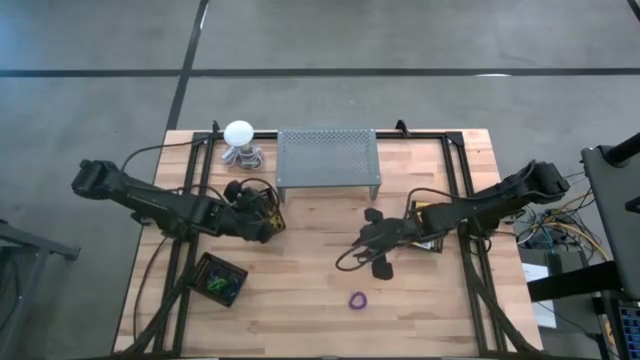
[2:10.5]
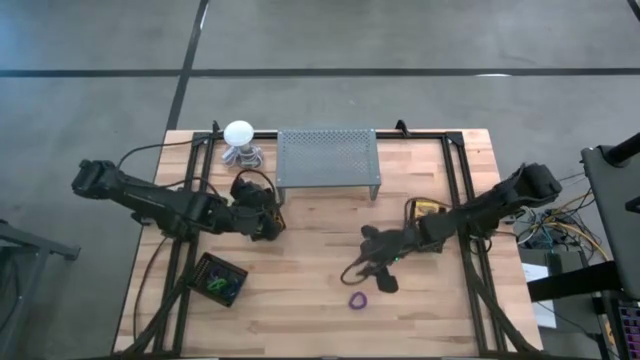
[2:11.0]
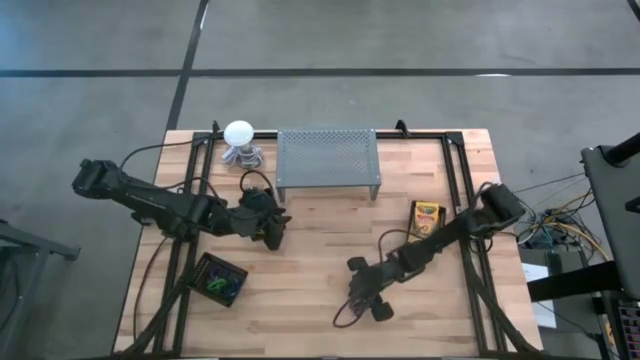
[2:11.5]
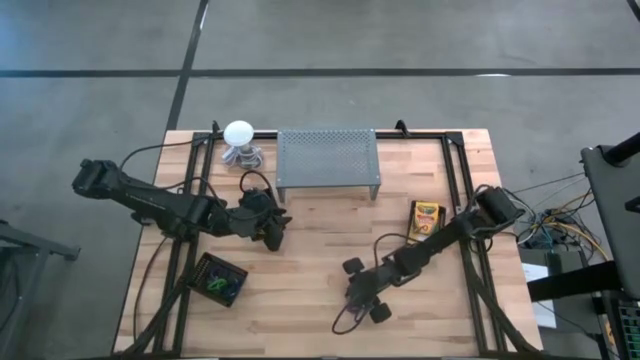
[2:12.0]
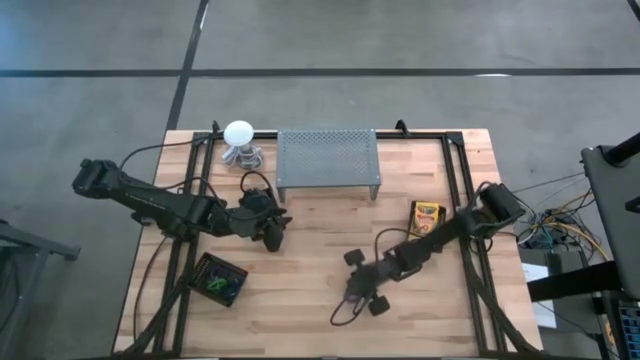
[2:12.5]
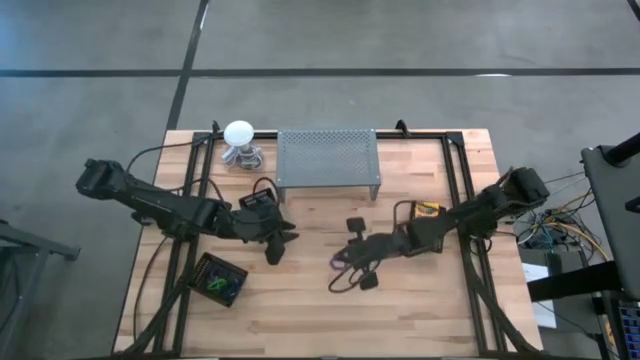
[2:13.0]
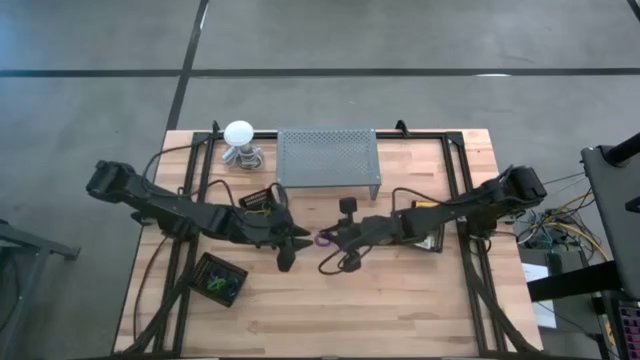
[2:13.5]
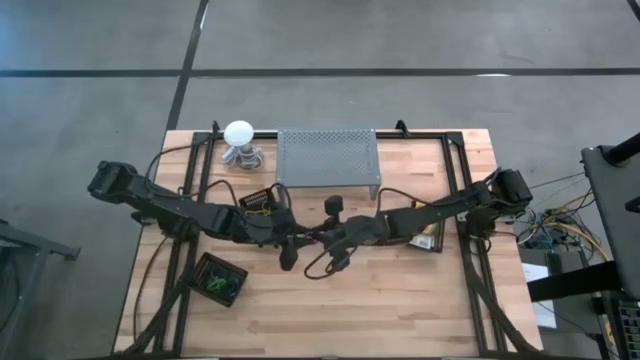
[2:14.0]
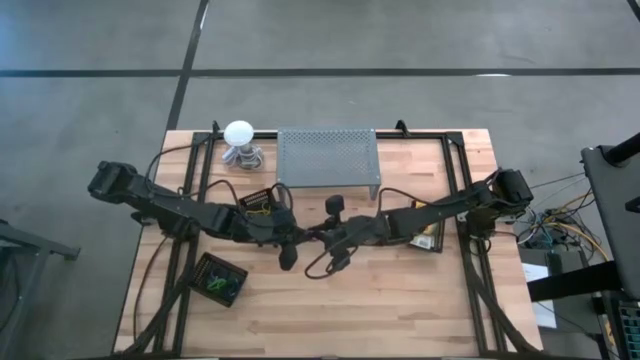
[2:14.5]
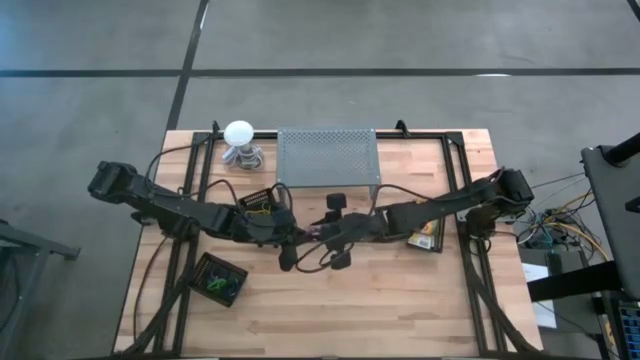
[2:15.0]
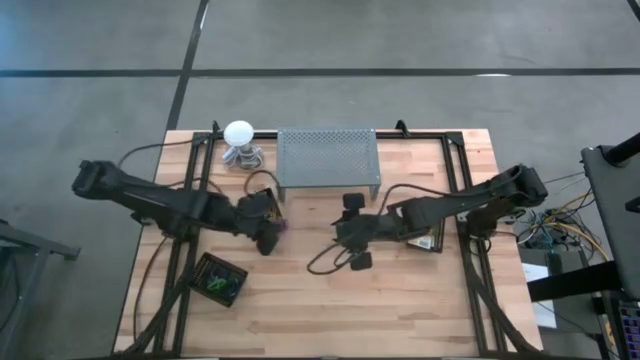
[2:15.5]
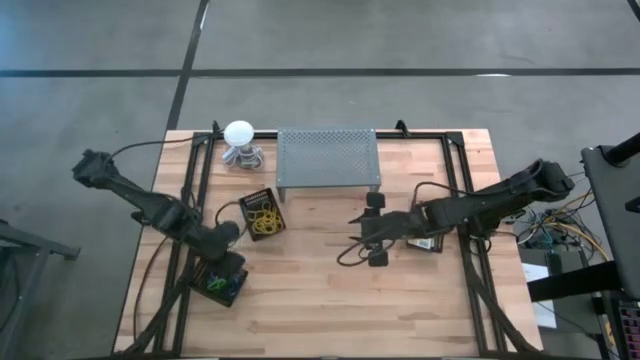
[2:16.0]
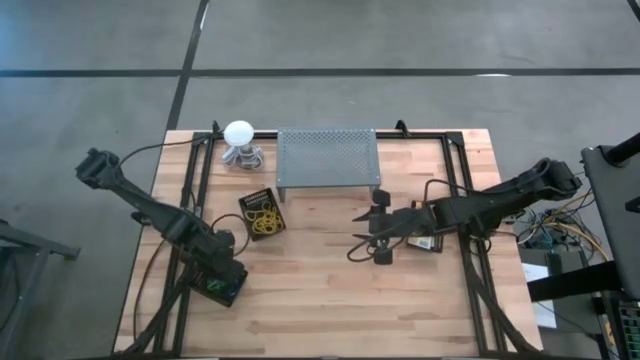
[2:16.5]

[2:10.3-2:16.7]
Task: Pick & Place Office Desk Supplies
Put the purple spring keychain into the bottom black bin

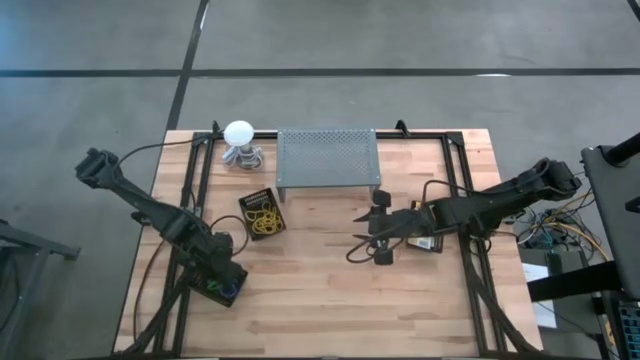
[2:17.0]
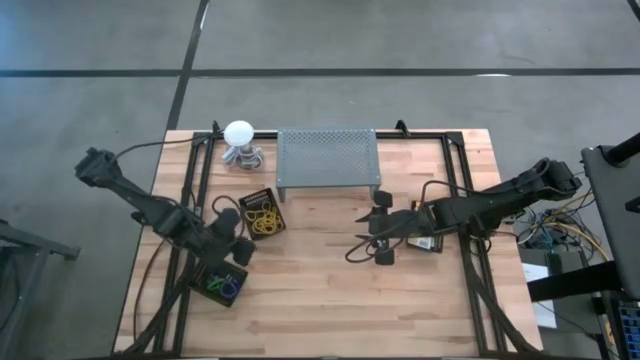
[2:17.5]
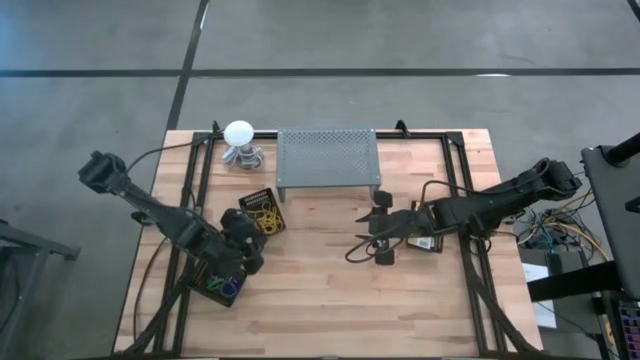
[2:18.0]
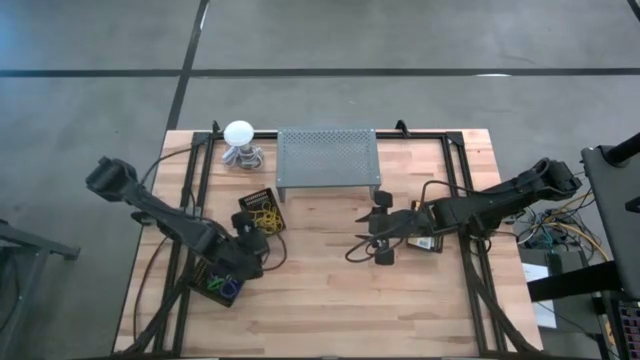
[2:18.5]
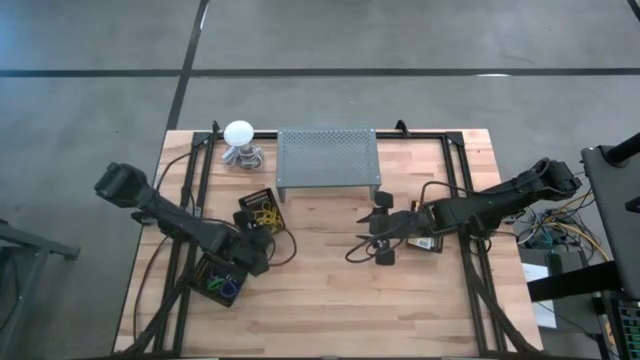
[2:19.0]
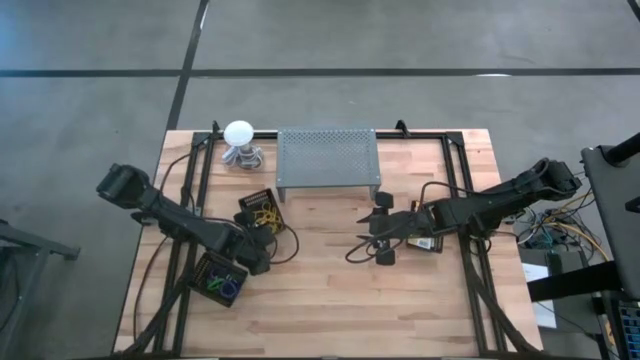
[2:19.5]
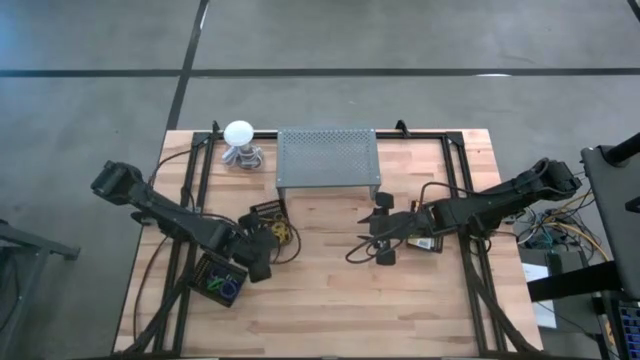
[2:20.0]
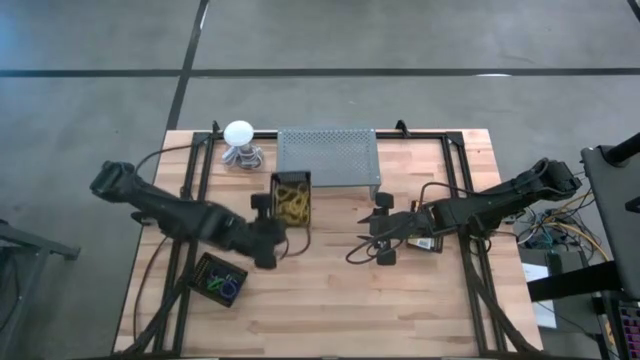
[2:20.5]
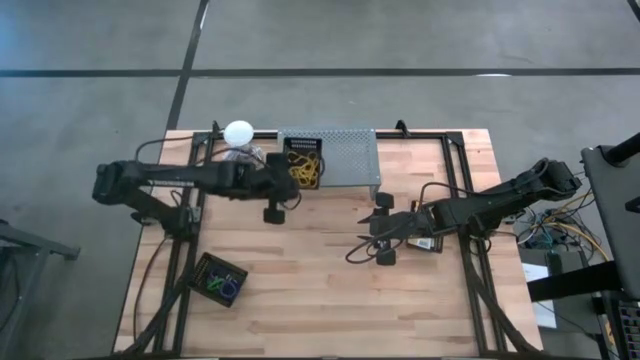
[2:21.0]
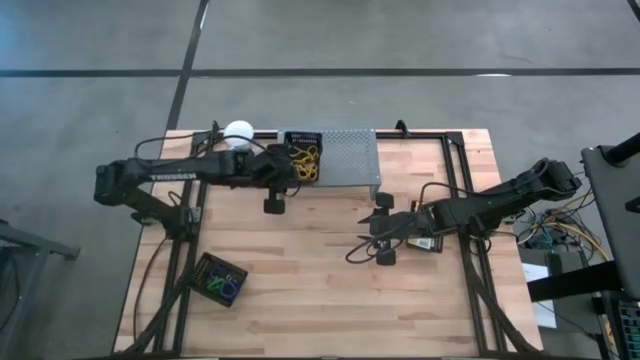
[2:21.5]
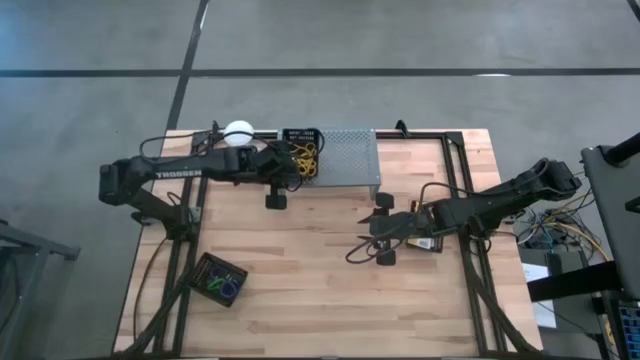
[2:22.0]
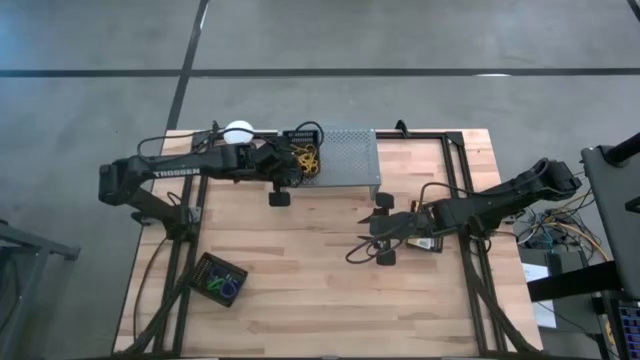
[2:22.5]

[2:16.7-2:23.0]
Put the top left black bin on the shelf

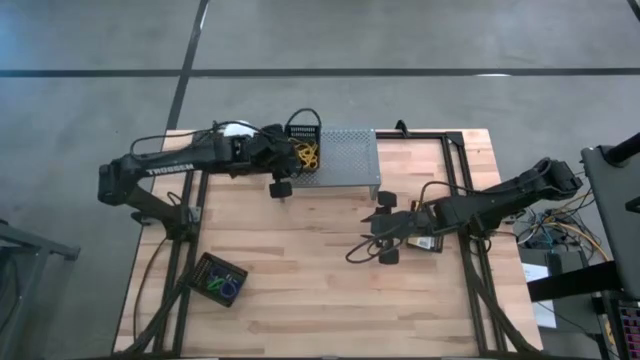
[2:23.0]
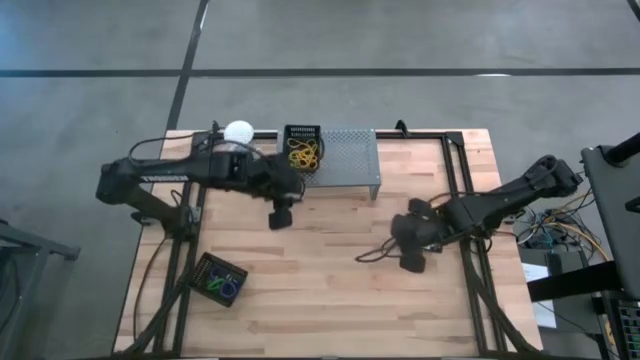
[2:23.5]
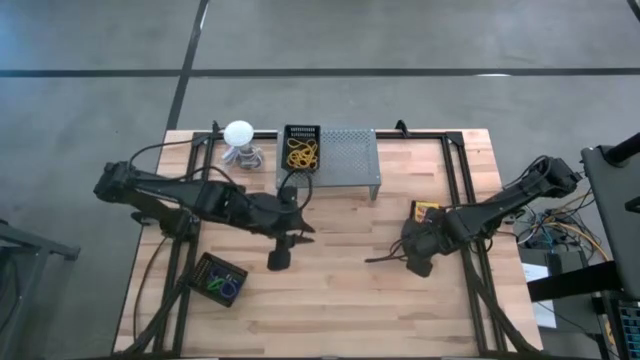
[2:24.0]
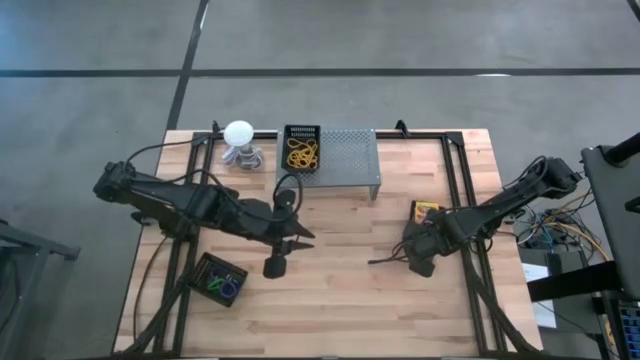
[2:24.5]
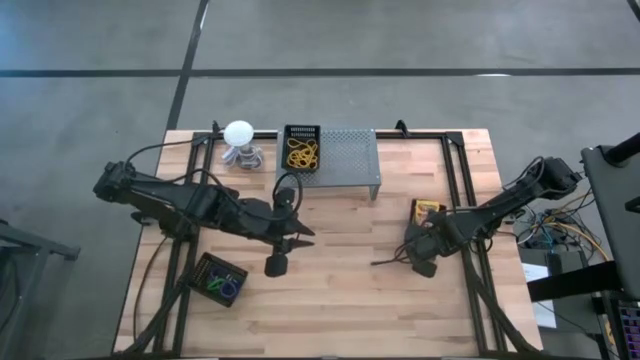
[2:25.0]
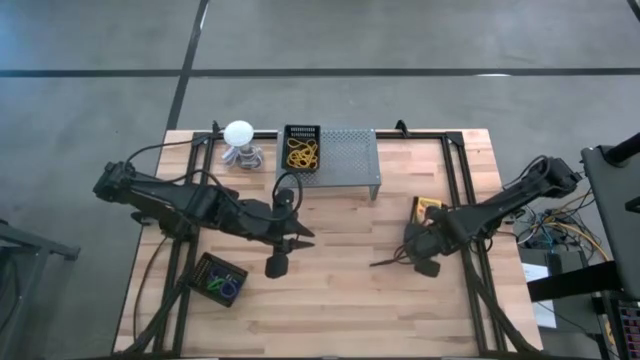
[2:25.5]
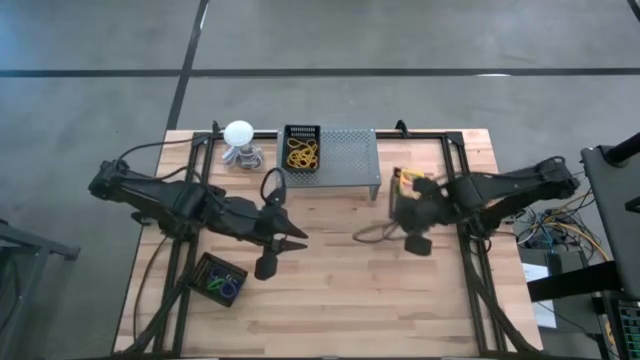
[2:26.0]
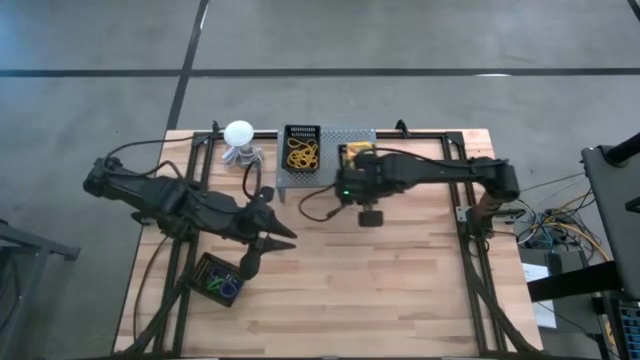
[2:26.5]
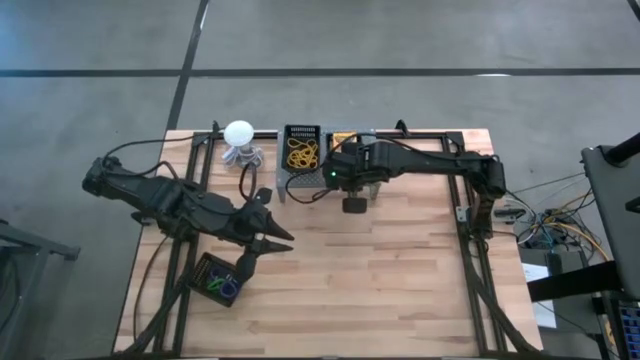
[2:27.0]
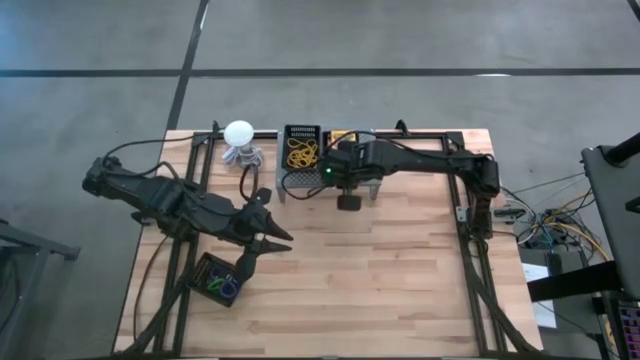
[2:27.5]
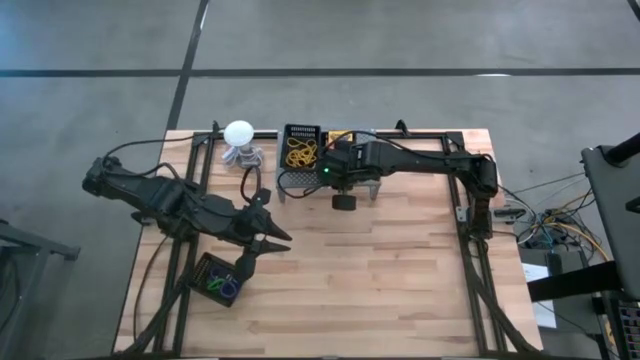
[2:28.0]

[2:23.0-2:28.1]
Put the right black bin on the shelf

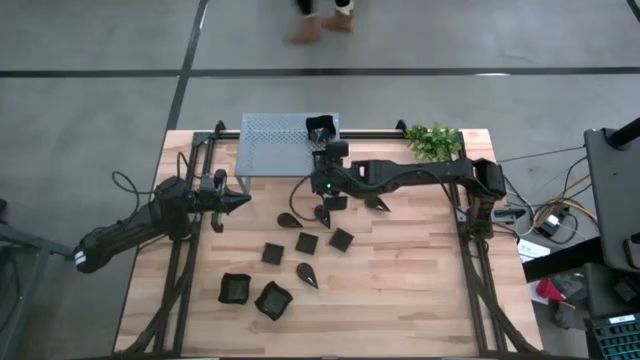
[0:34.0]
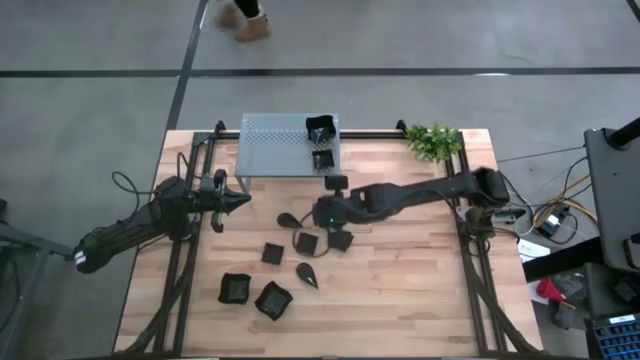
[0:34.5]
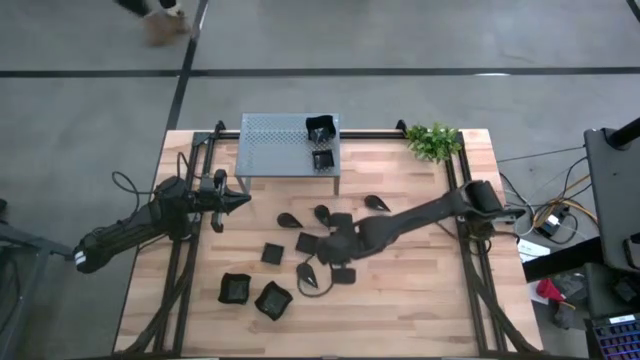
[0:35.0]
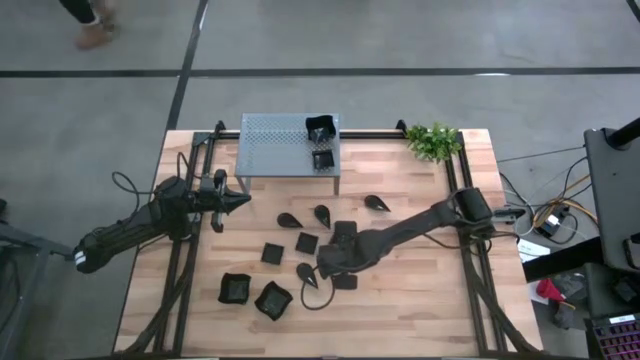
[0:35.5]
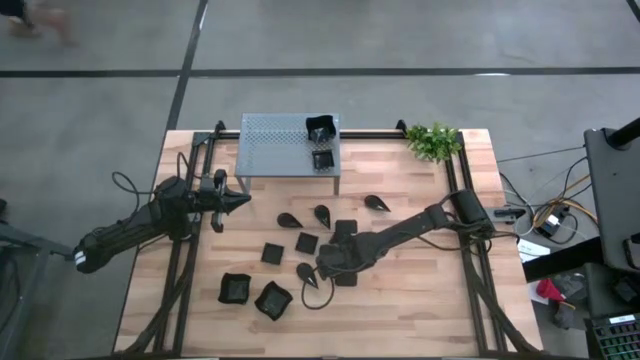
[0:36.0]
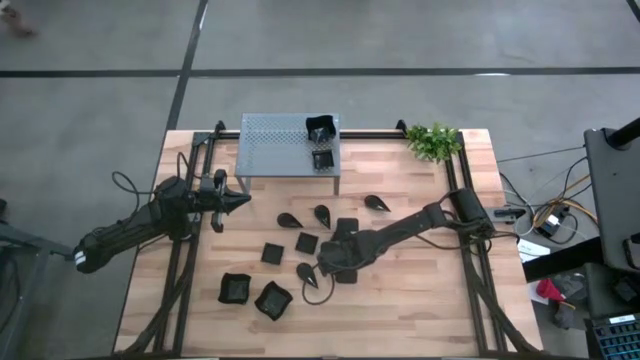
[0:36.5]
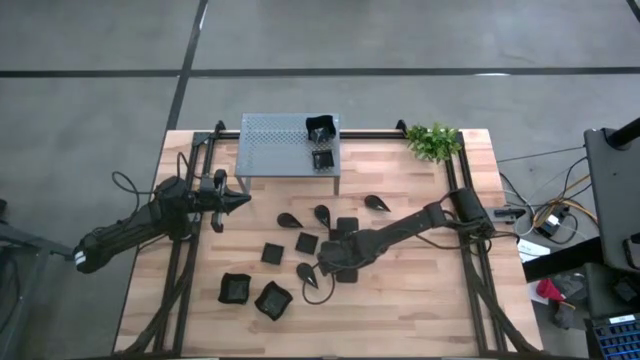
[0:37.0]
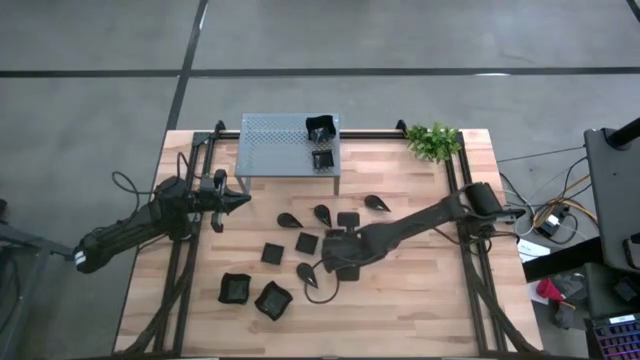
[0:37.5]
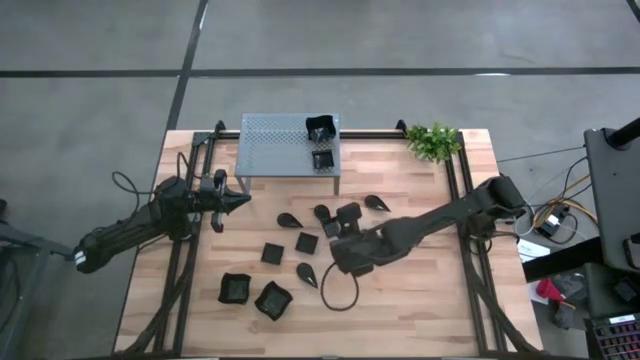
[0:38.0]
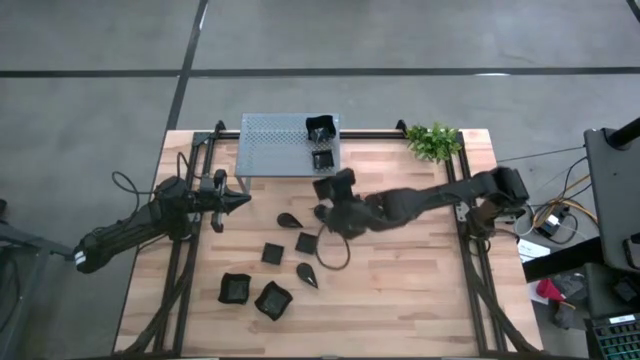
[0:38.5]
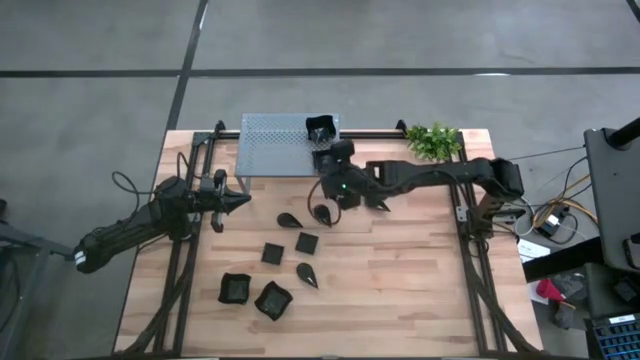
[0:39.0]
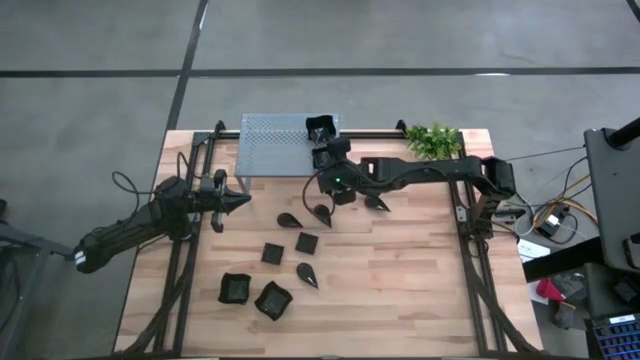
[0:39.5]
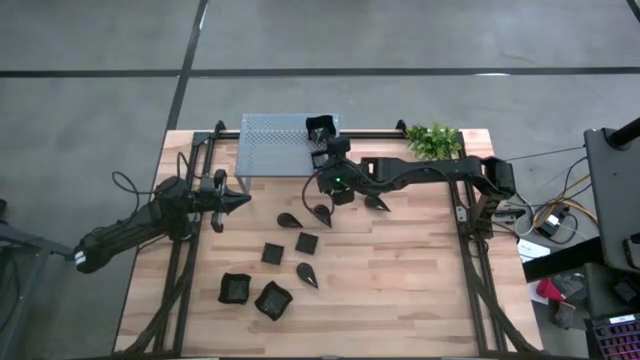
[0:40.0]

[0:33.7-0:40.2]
Task: Pick & Place Mini shaped plates
Stack the black square plate on top of the other black square plate on the shelf
